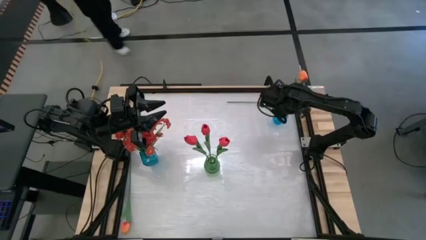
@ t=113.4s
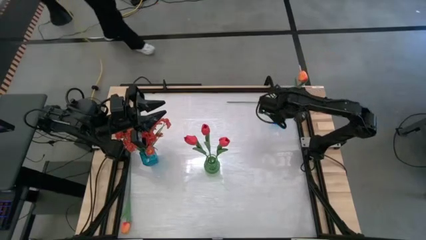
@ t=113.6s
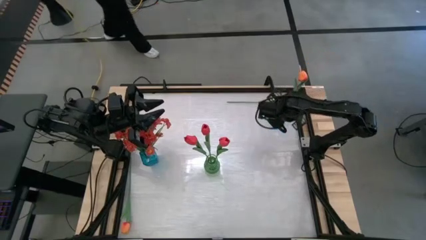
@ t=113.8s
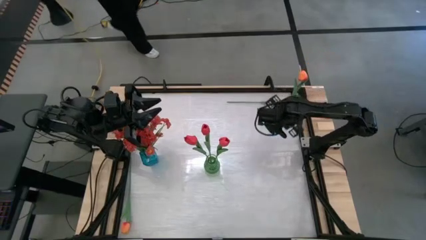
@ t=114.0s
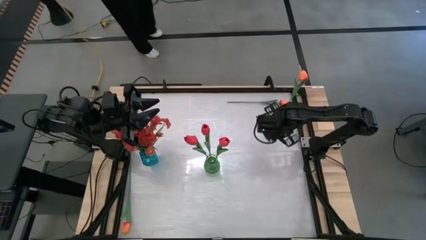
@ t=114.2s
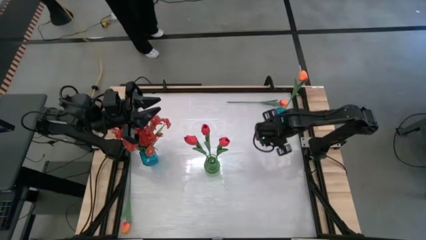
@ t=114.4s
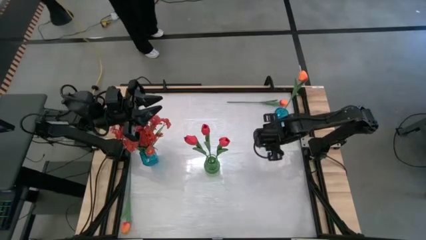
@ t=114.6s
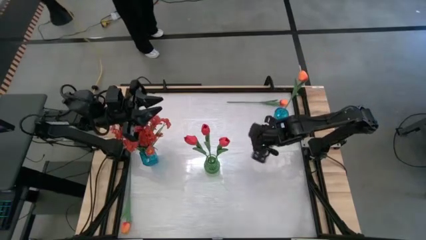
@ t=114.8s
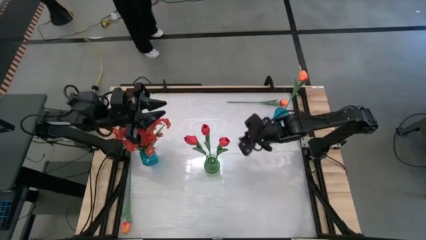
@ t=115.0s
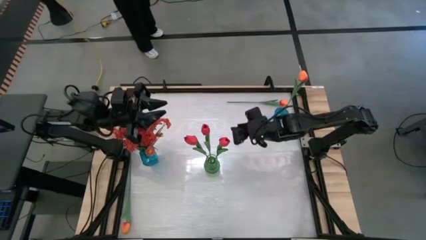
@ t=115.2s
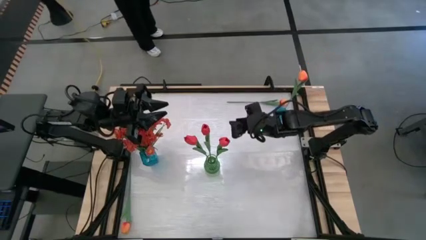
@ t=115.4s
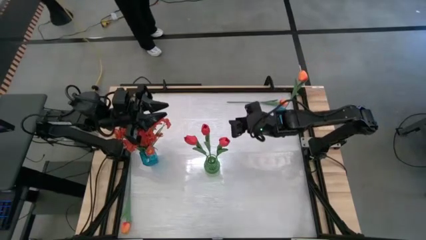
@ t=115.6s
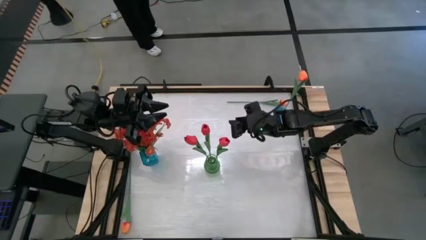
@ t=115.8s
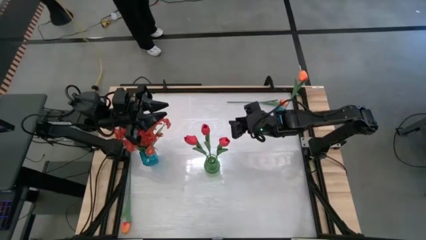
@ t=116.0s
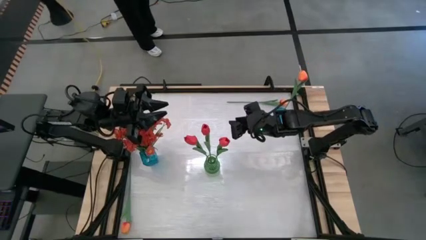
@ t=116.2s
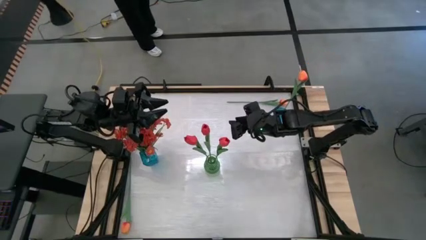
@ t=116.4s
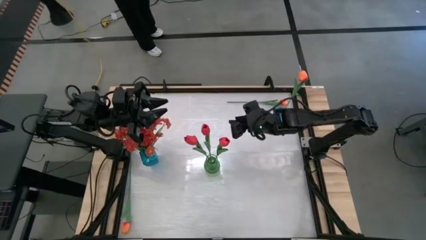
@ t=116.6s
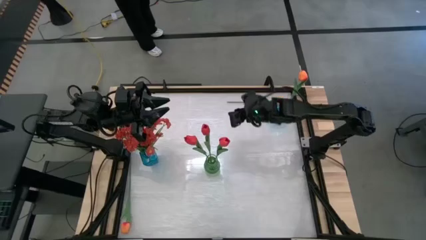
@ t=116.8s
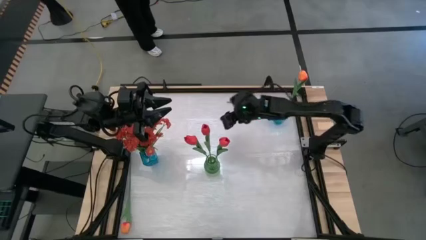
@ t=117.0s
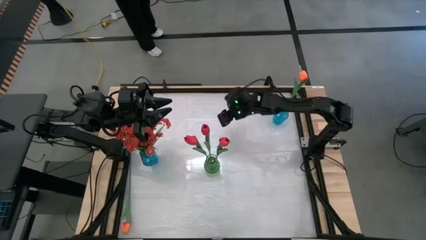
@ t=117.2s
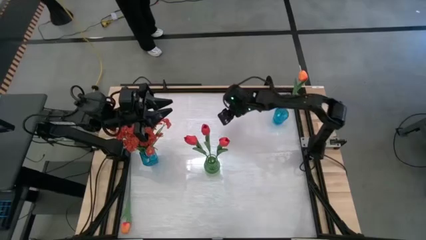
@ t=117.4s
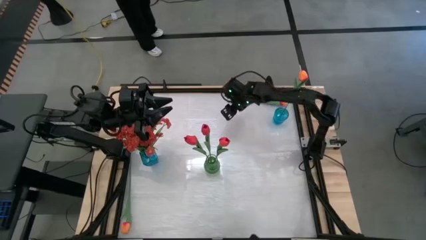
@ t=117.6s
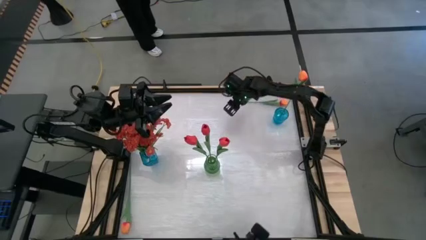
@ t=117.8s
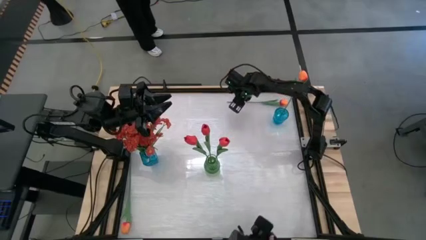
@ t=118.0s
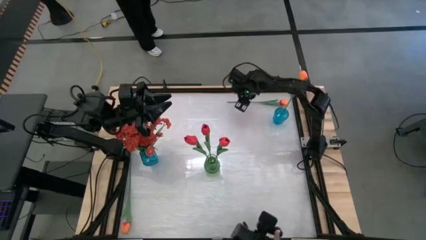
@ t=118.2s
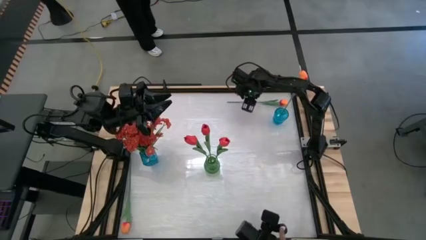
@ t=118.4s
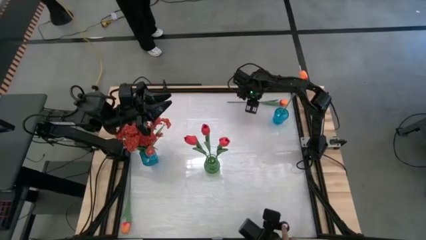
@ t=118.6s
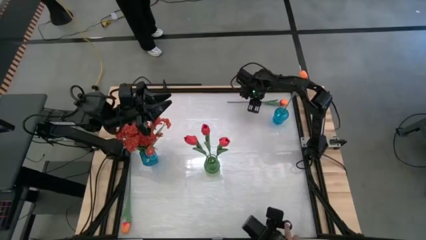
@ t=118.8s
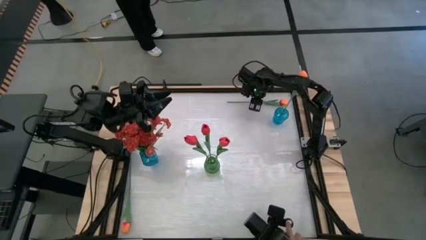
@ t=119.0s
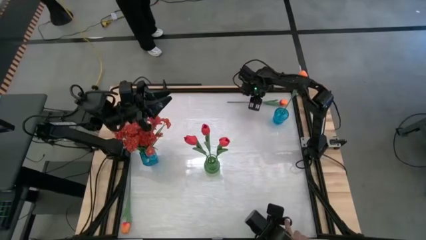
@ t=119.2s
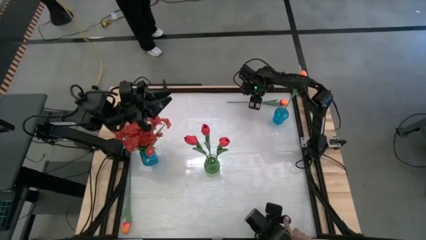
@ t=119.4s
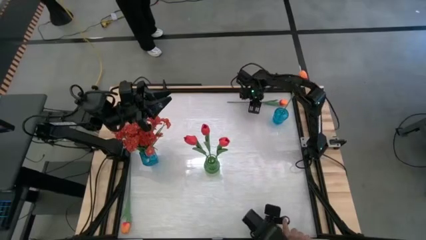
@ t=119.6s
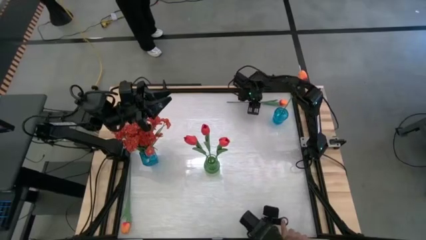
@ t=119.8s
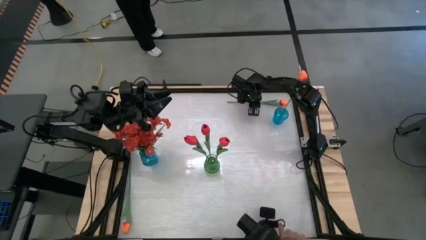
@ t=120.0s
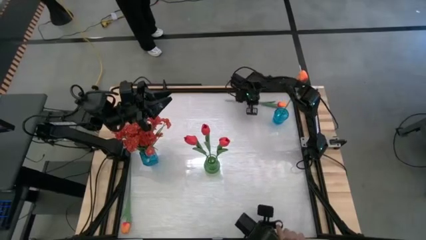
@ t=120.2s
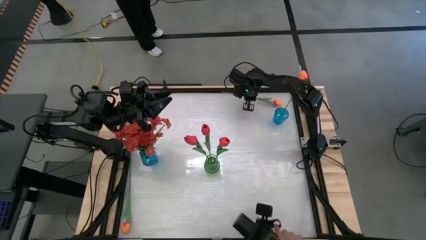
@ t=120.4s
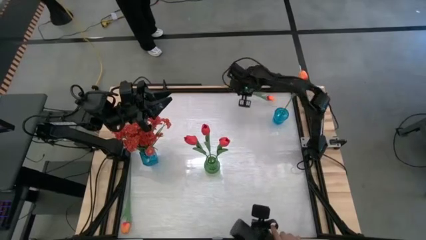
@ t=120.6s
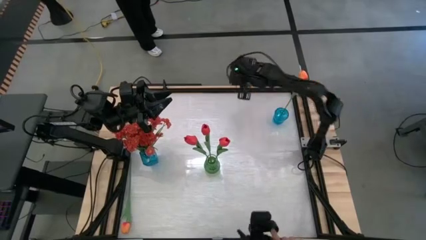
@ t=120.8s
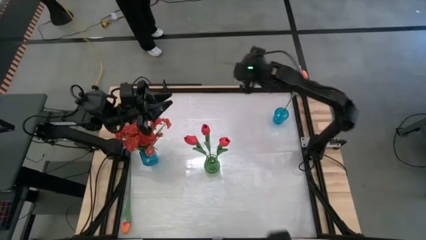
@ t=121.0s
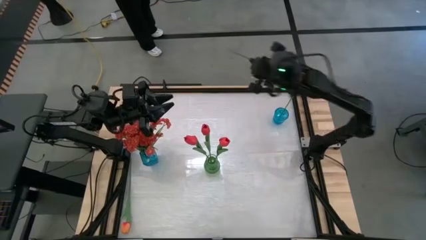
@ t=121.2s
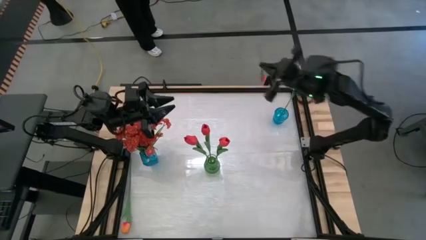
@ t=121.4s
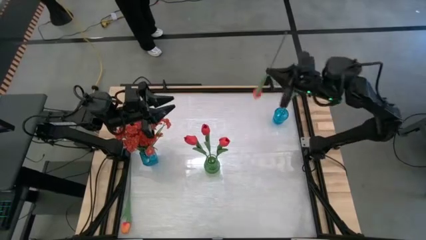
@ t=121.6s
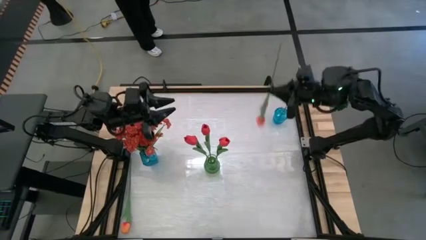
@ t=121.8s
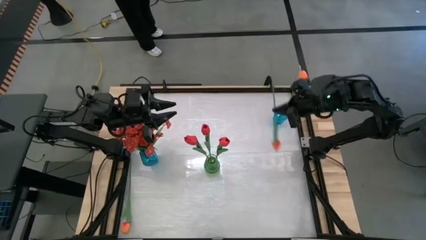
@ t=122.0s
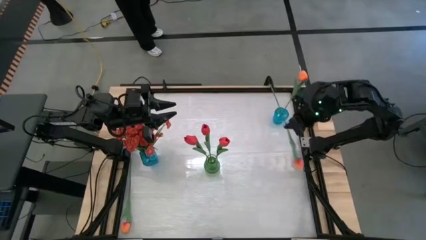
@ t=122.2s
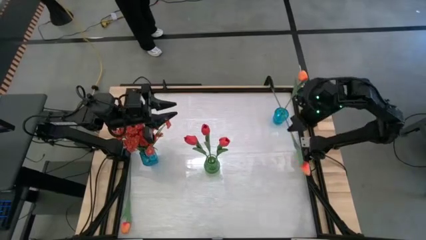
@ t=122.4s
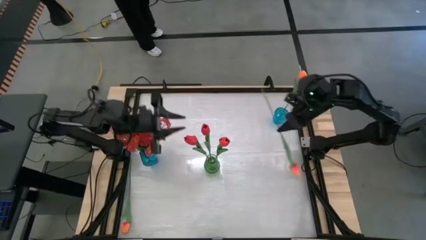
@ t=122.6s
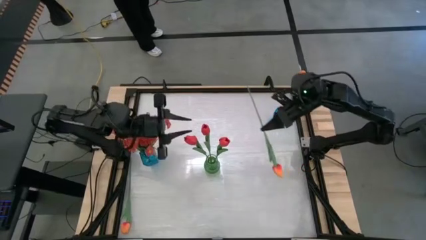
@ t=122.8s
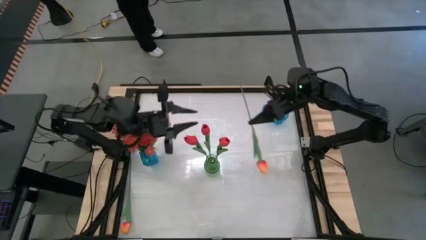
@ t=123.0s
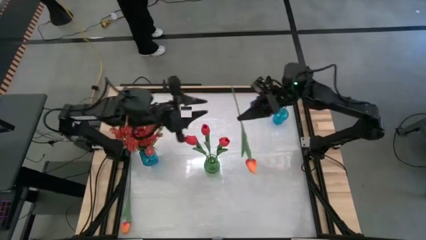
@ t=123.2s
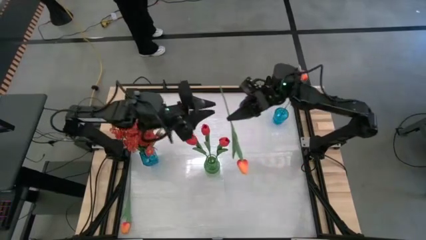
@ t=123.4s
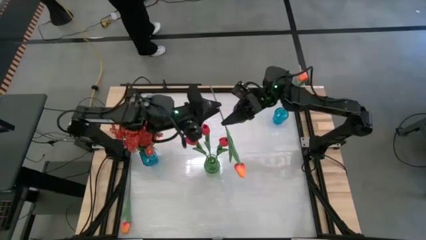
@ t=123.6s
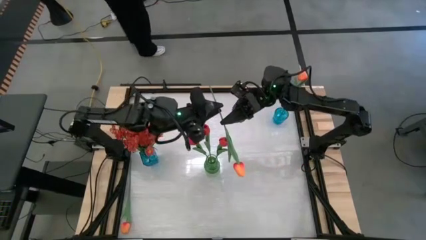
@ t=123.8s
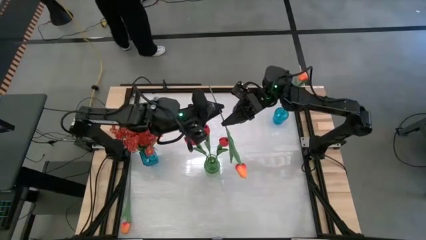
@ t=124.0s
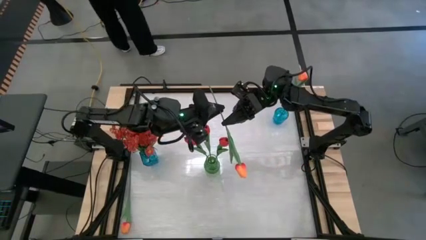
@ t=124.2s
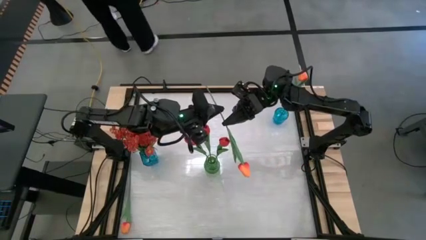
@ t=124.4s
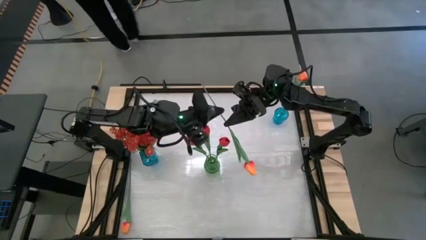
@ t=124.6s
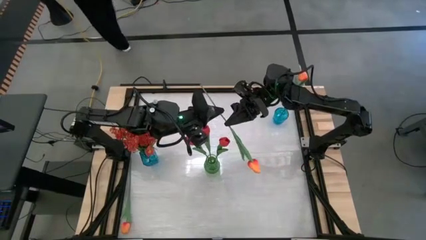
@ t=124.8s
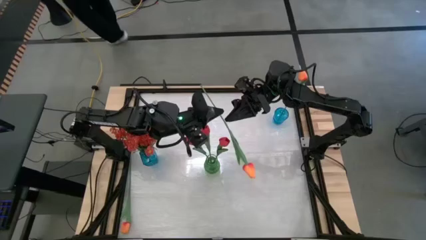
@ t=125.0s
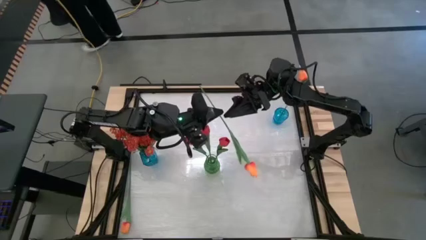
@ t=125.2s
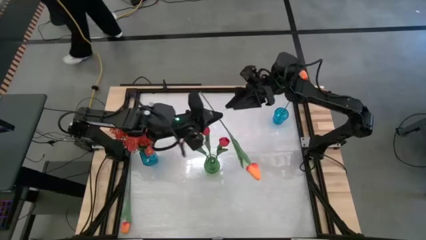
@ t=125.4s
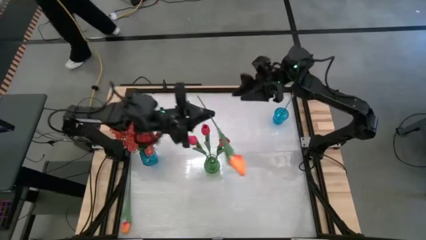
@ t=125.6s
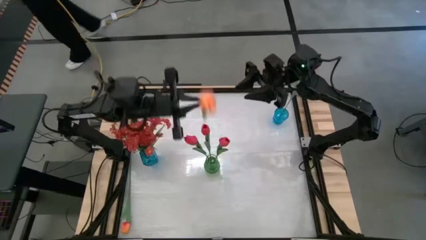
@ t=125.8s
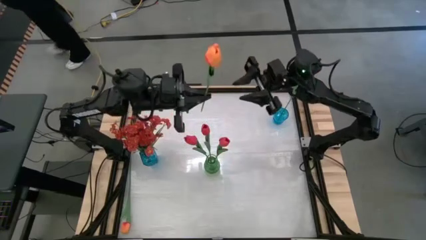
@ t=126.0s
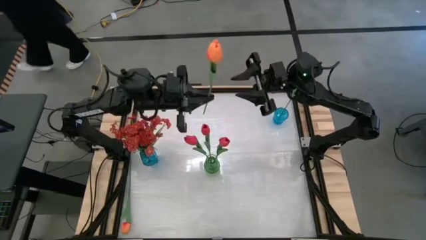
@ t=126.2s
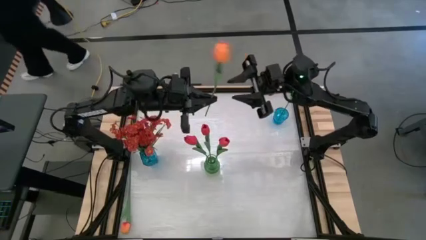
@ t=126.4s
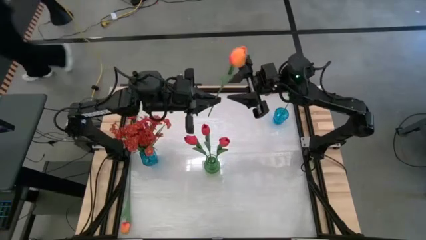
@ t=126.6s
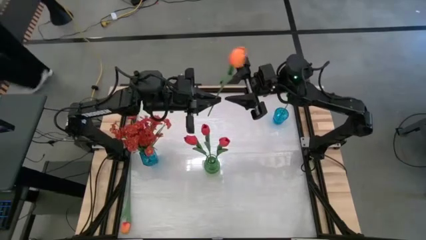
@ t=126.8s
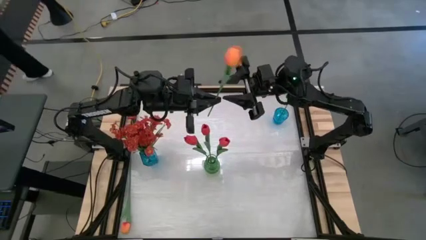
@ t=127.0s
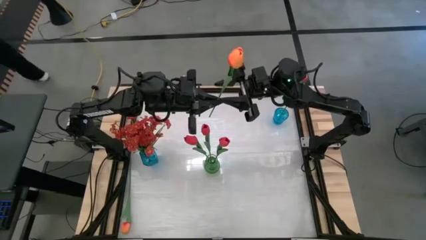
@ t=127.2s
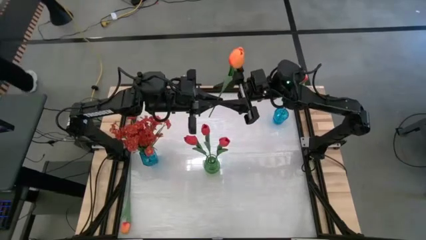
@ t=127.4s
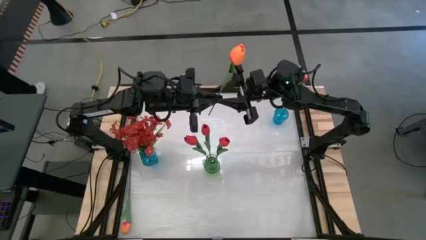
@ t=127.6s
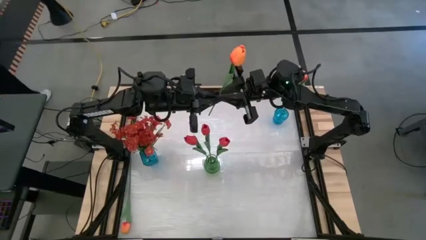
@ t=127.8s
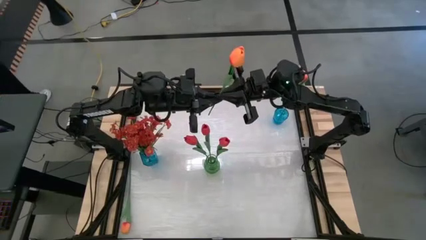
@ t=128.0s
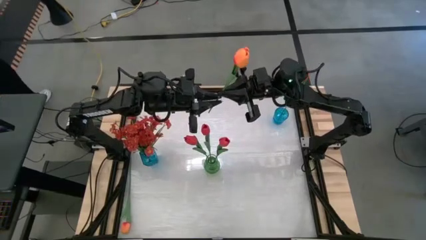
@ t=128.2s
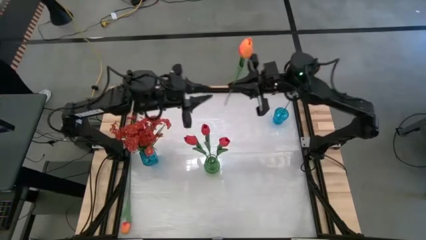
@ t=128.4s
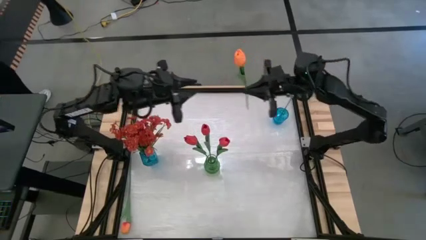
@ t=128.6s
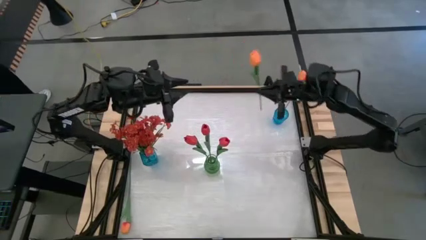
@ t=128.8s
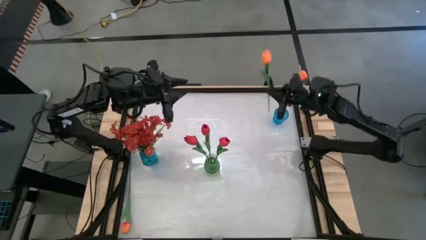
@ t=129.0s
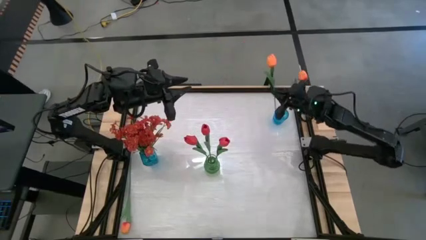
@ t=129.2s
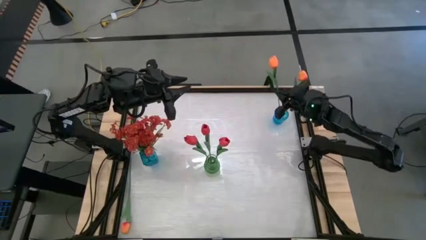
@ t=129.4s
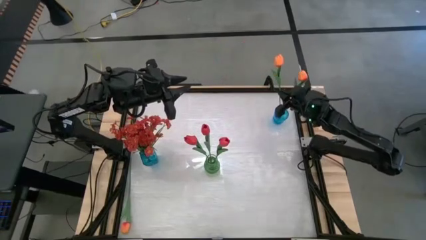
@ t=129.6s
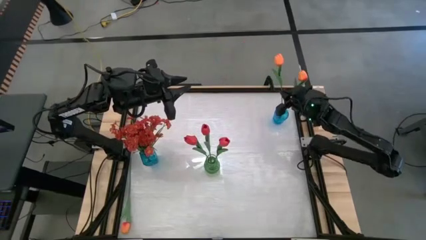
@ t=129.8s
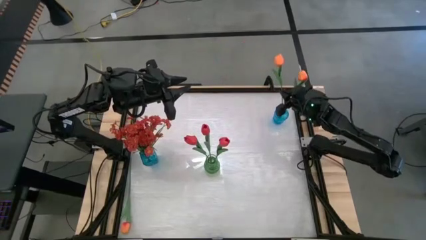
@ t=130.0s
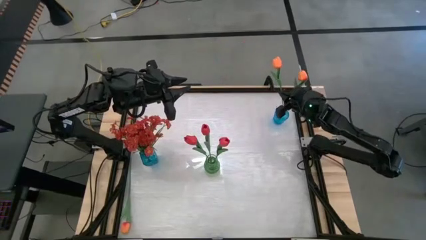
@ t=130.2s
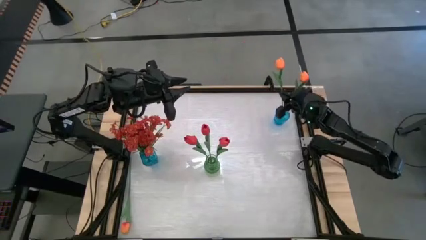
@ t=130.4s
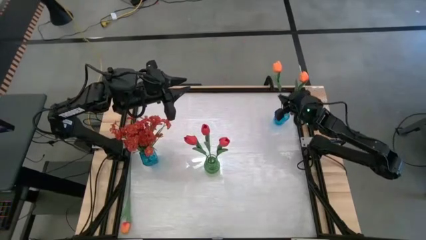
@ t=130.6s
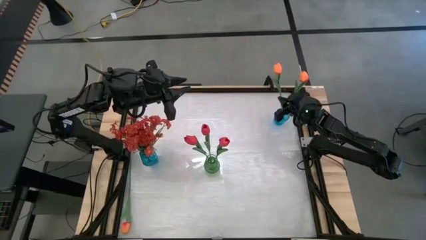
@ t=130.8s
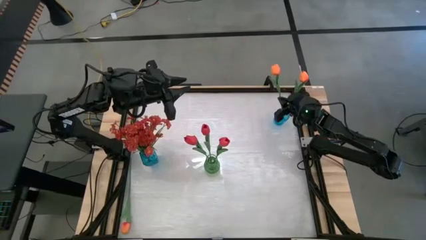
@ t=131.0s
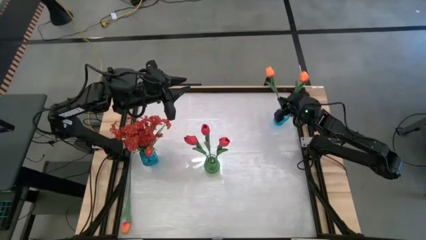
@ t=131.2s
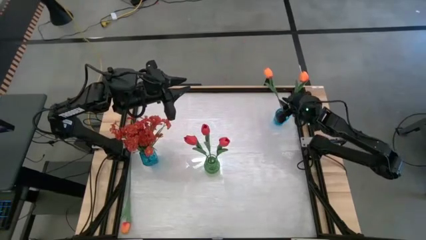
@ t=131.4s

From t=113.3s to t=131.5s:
Task: Sort flowers into vase by color
Put the top orange flower into the right blue vase
